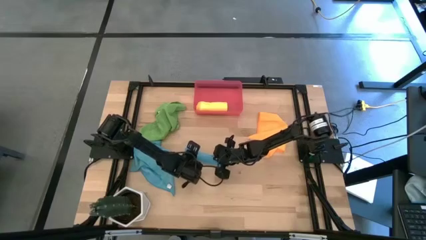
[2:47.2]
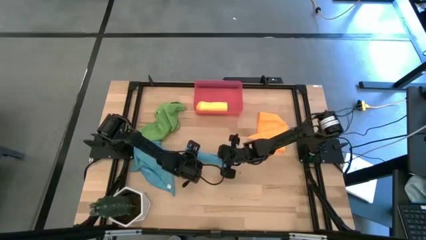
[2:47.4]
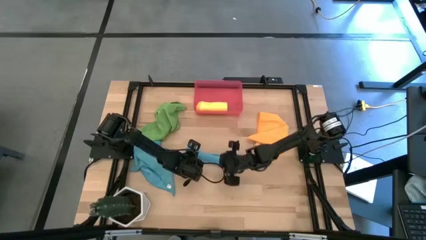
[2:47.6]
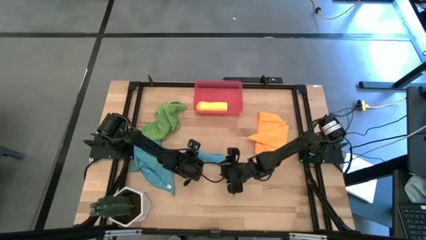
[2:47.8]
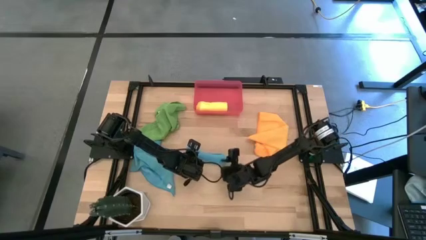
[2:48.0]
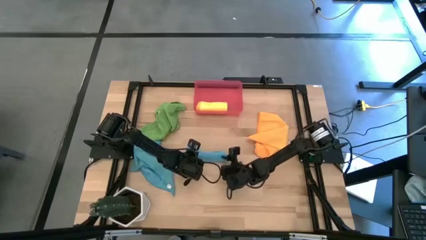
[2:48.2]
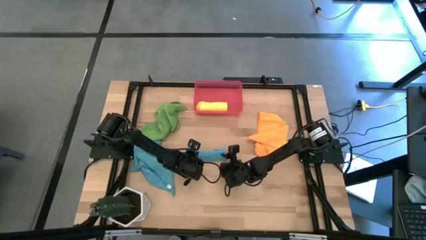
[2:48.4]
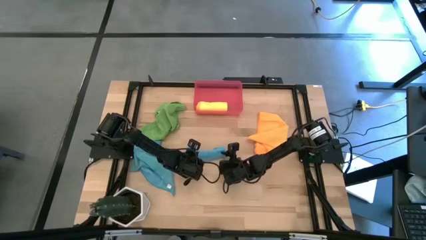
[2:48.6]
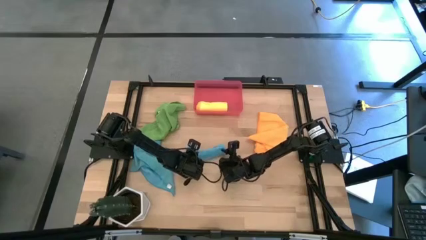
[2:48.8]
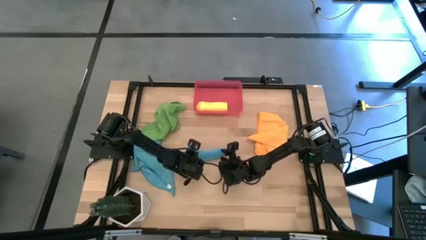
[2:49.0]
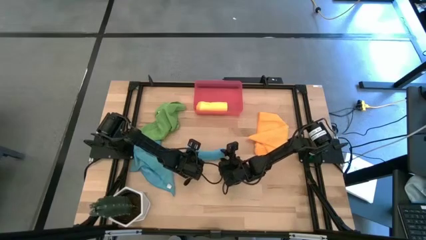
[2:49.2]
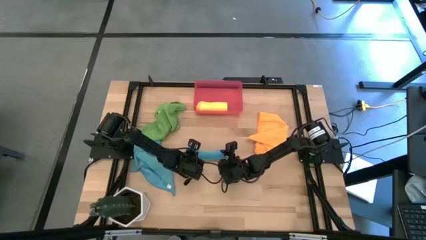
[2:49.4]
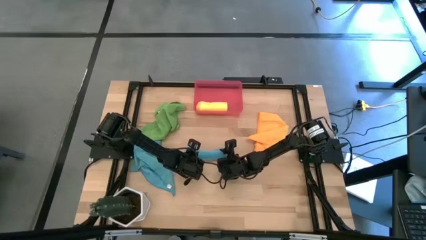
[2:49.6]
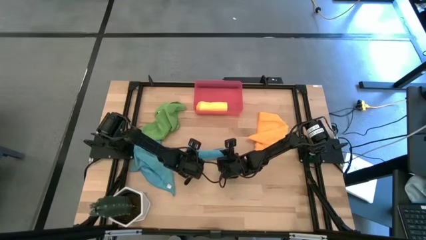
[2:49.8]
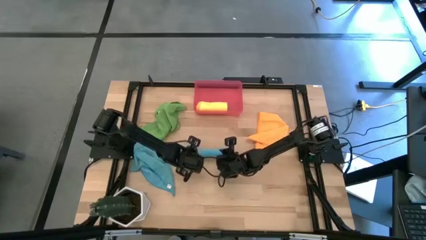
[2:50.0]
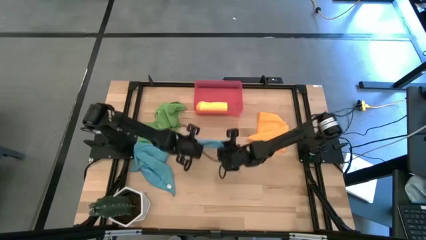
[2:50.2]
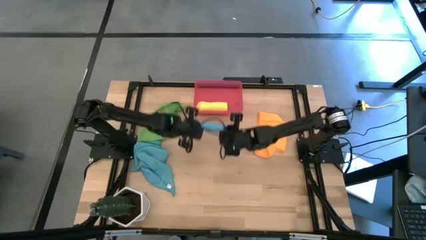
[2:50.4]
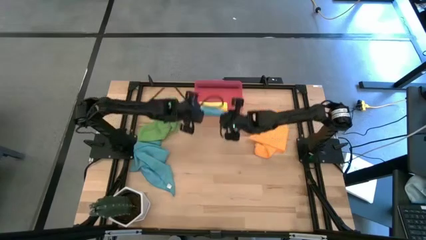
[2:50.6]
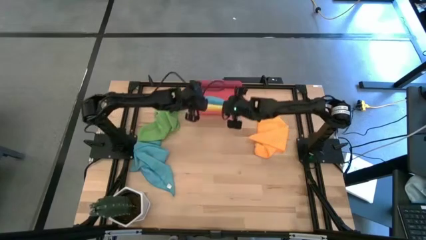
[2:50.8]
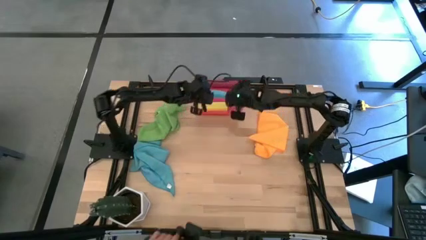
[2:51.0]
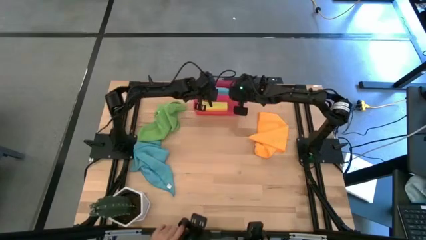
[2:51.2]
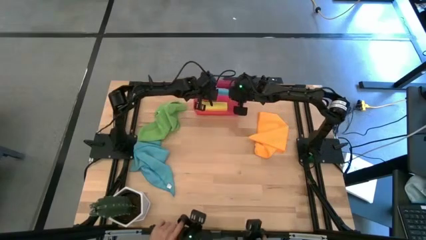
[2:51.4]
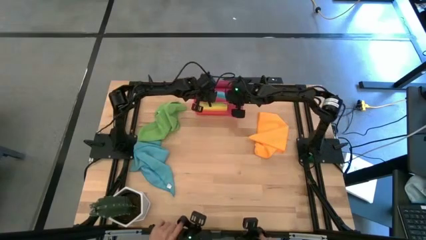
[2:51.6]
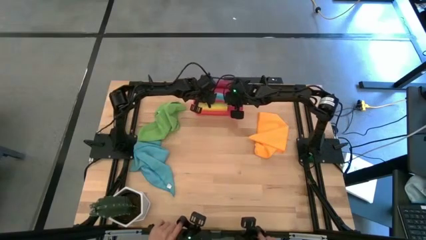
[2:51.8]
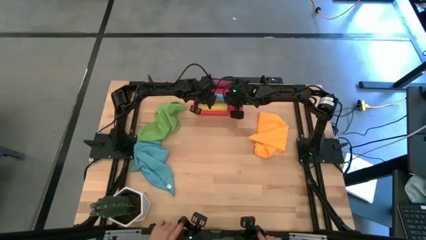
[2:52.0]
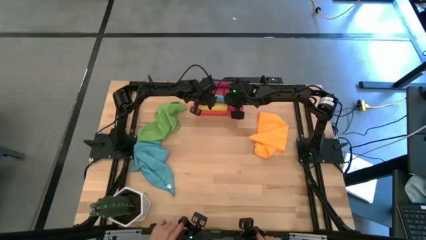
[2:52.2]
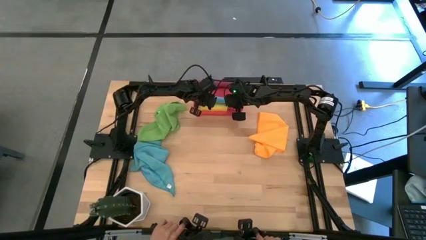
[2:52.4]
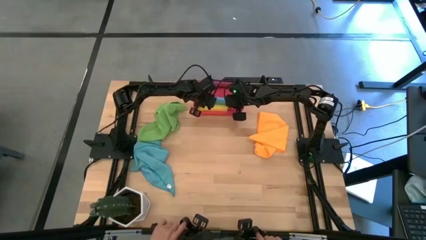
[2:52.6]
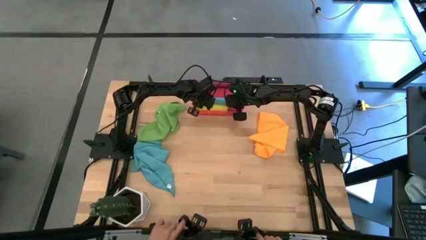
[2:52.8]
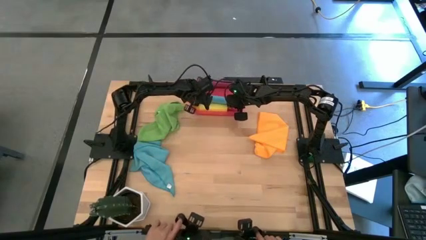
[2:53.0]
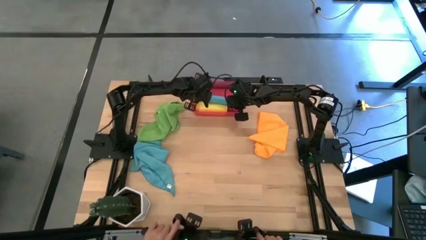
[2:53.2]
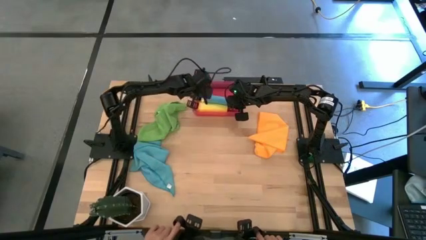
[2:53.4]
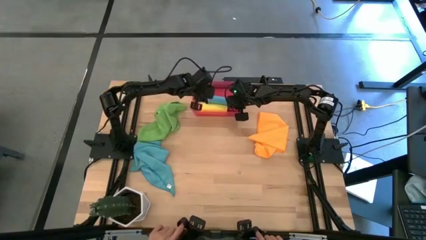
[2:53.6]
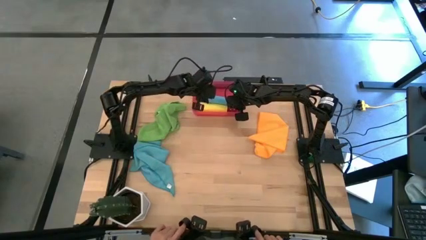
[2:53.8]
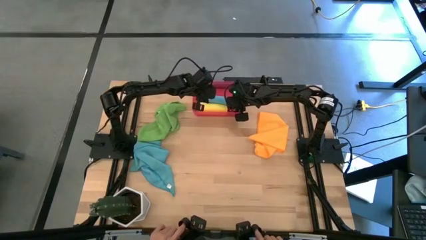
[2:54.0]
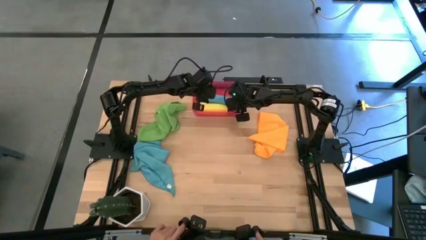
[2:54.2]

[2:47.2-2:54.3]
Task: Roll microfiber towels into tight, uniform cylinder then place into a basket
Put the left blue microfiber cloth into the red bin

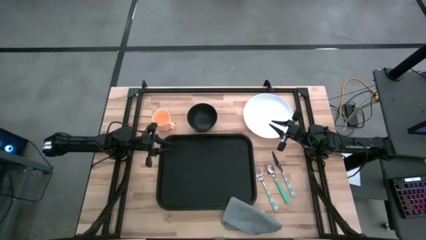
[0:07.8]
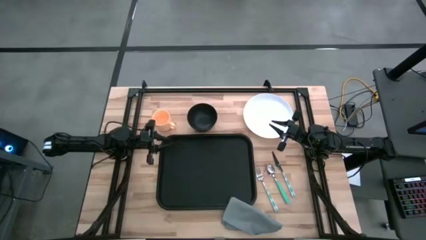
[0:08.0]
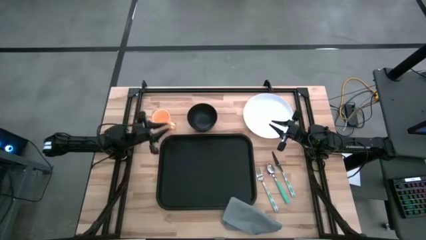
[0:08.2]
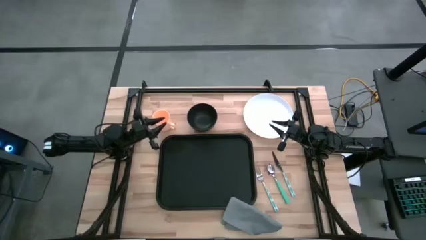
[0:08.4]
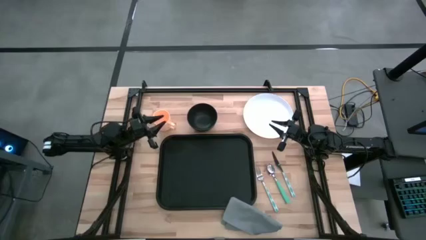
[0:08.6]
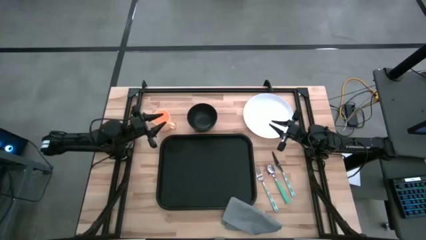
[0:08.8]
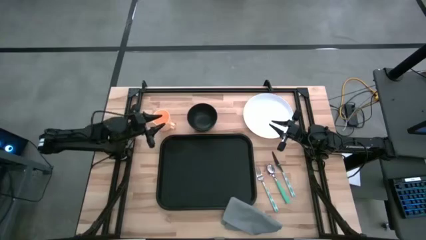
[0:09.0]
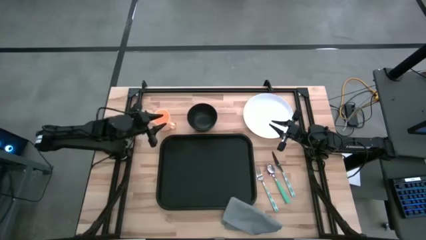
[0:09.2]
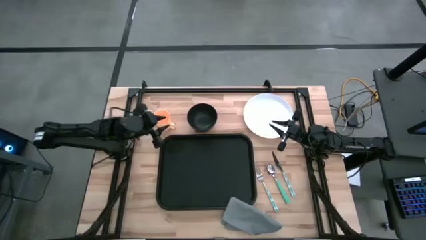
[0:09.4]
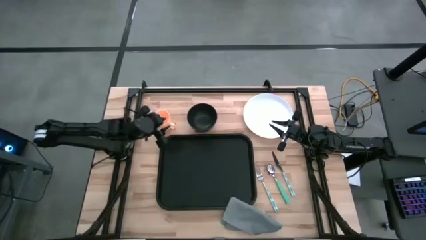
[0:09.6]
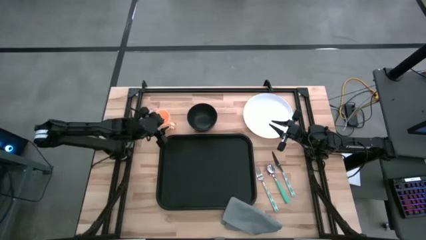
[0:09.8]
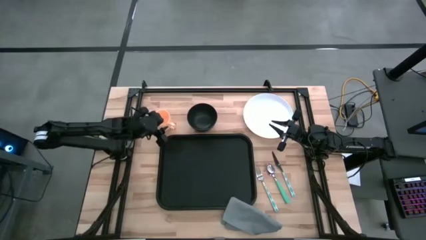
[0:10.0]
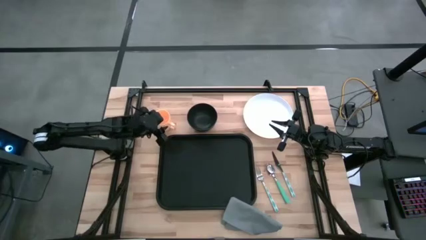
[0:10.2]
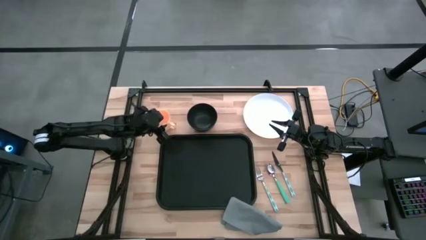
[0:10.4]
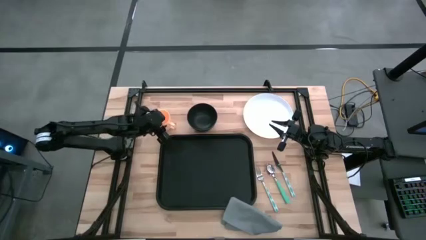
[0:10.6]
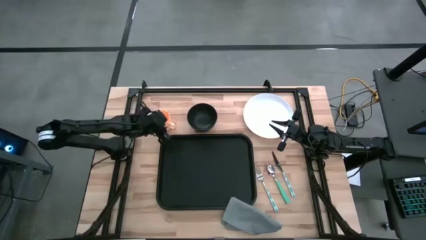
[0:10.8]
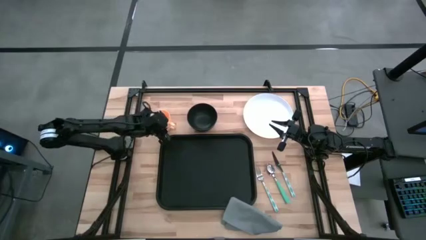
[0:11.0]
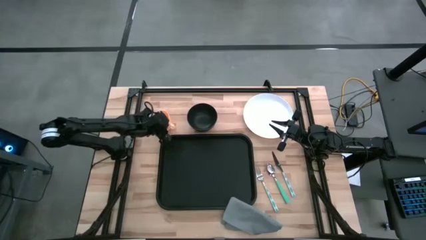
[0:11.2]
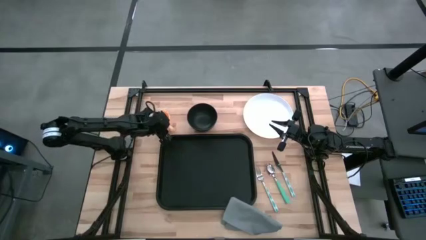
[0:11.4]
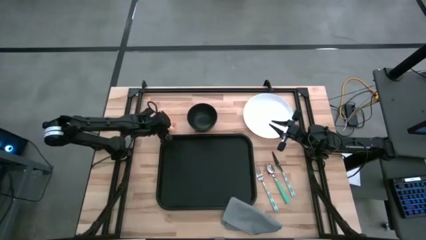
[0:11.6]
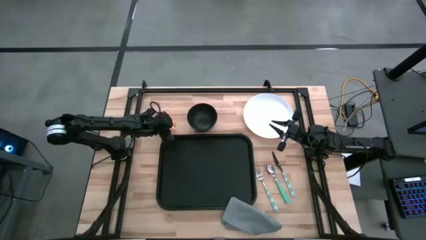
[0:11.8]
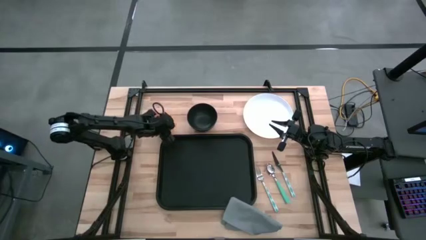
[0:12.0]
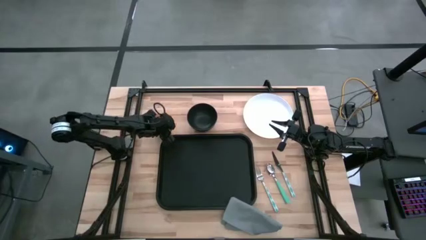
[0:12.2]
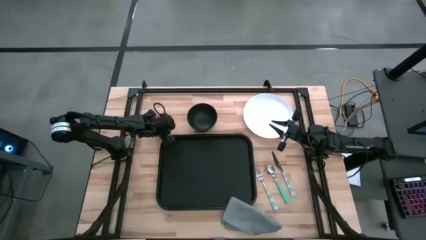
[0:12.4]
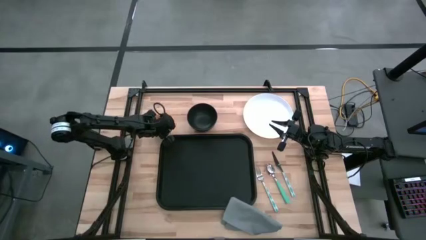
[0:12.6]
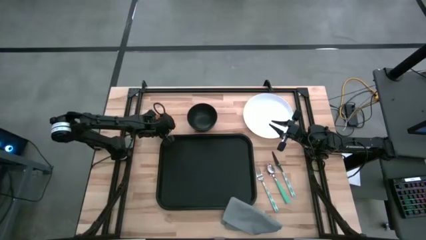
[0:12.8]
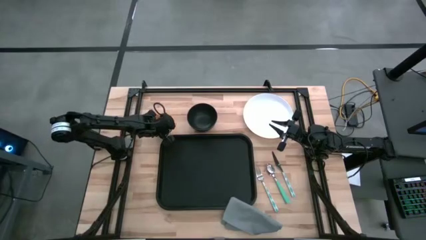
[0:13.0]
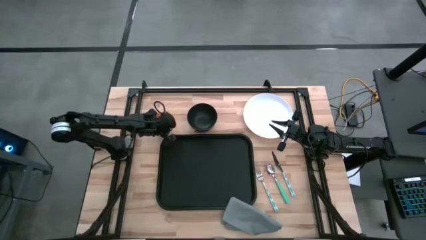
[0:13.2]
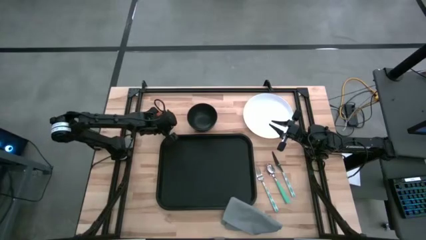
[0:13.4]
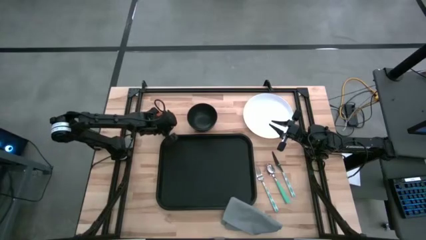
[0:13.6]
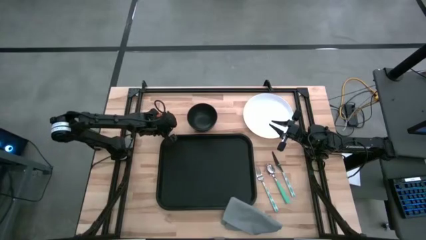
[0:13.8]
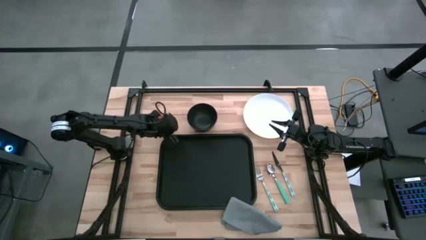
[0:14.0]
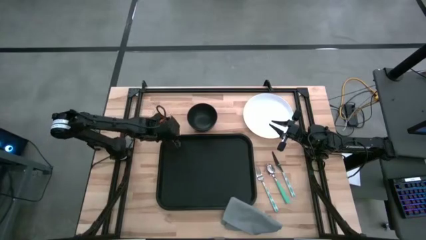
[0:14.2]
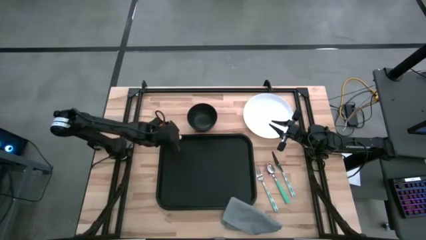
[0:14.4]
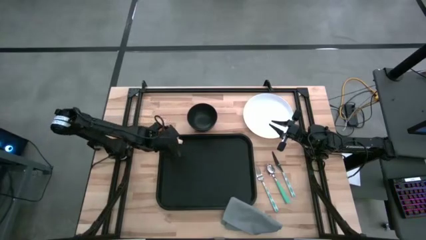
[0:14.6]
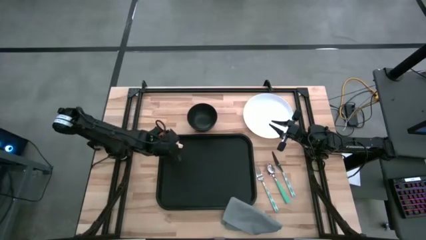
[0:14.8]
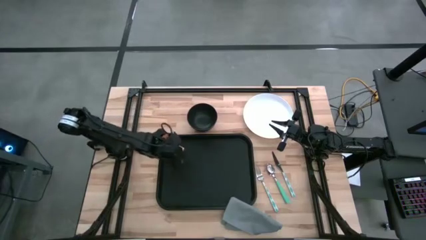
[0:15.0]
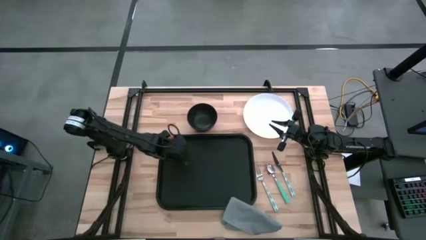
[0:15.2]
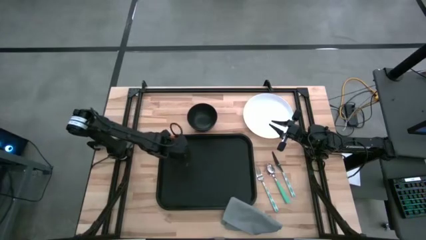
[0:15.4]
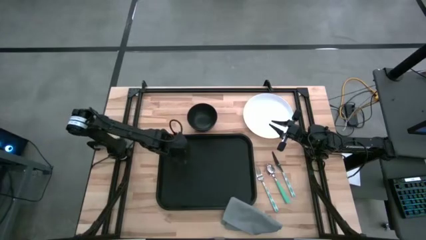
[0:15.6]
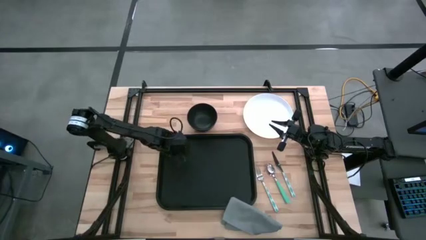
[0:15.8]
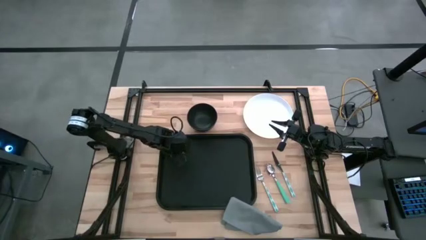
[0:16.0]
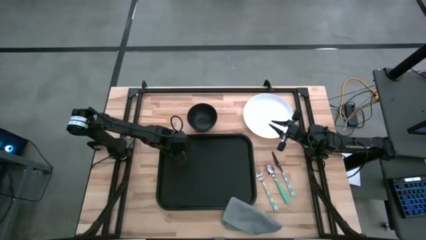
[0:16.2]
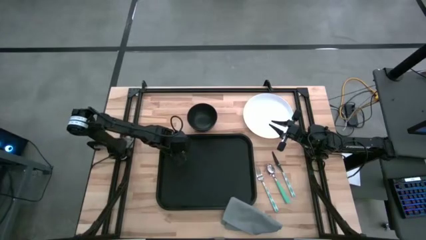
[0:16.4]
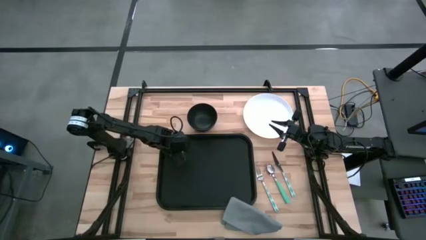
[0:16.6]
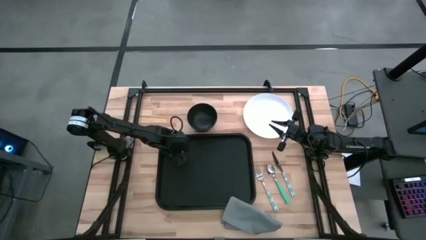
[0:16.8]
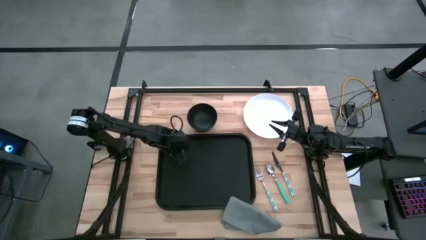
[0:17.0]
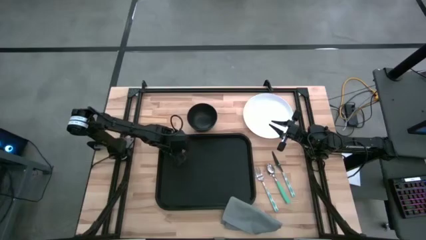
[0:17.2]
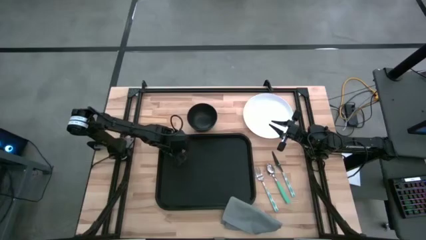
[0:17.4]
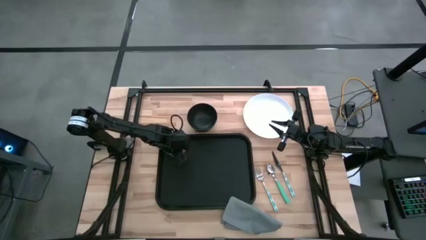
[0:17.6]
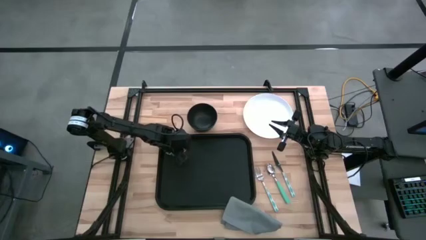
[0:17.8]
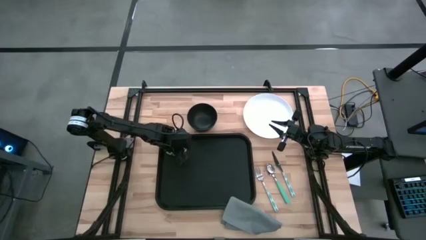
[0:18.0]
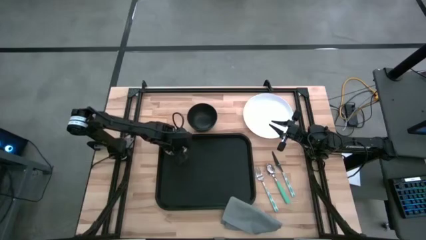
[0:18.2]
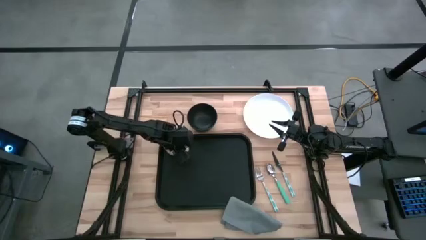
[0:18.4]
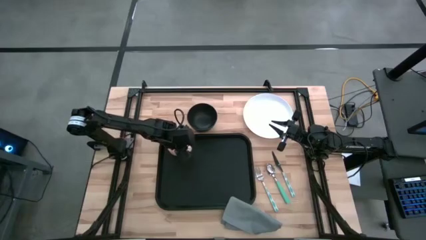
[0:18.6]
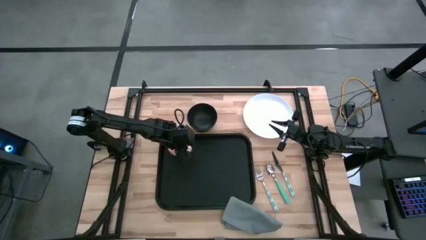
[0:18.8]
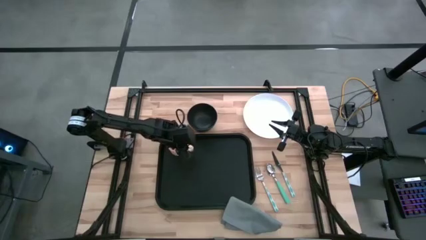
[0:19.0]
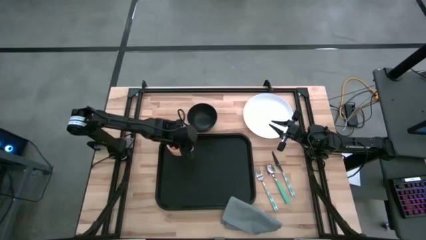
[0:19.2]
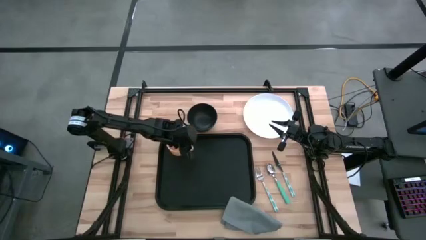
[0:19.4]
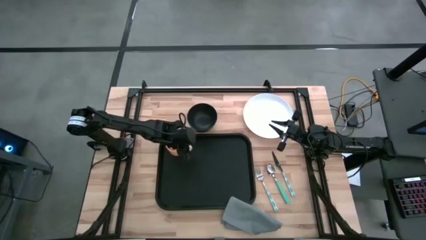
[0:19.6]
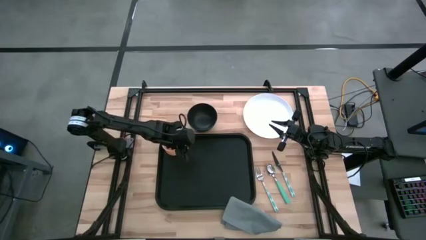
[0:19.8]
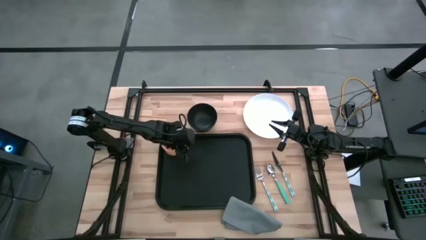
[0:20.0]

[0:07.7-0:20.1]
Task: Set up tray
Put the mug in the top left corner of the serving tray
